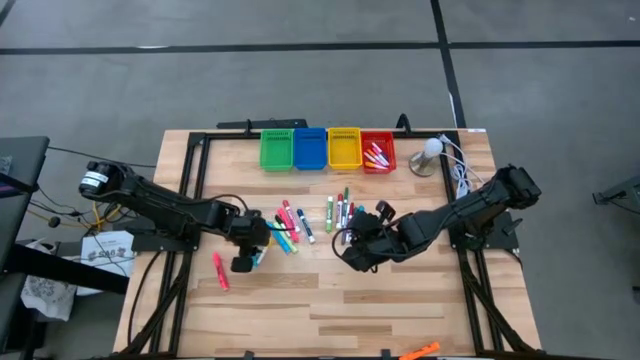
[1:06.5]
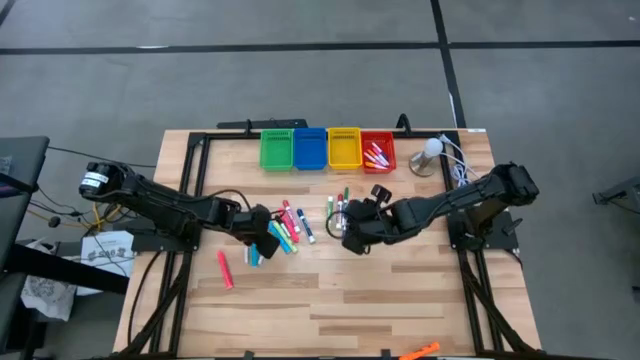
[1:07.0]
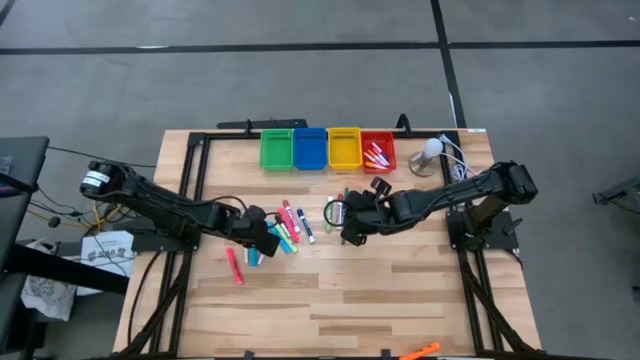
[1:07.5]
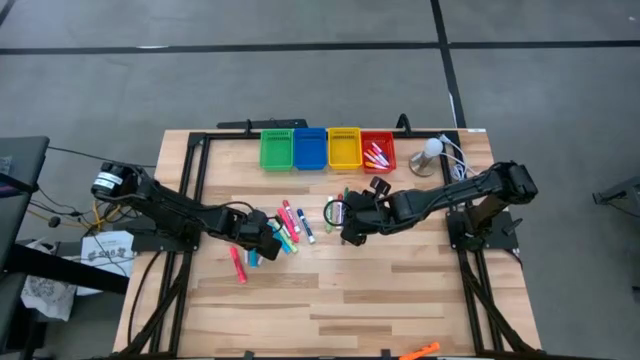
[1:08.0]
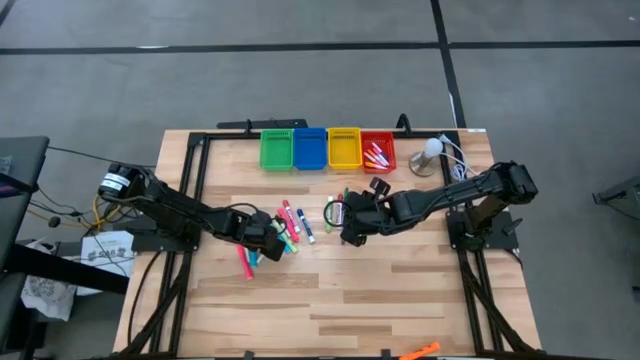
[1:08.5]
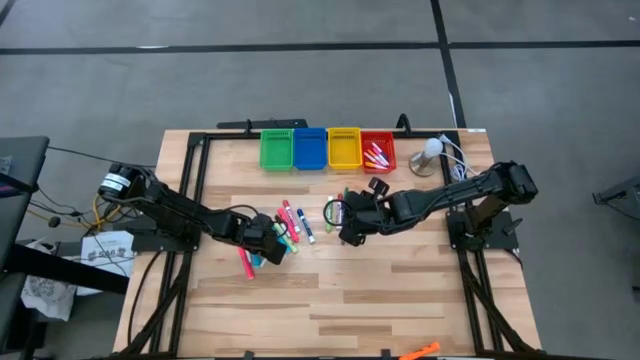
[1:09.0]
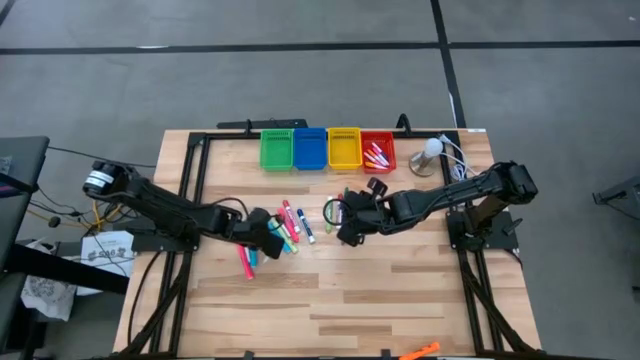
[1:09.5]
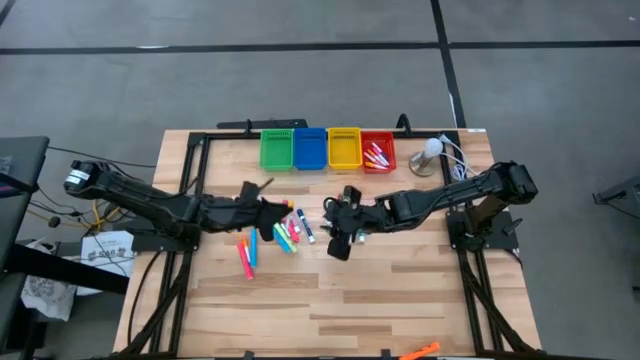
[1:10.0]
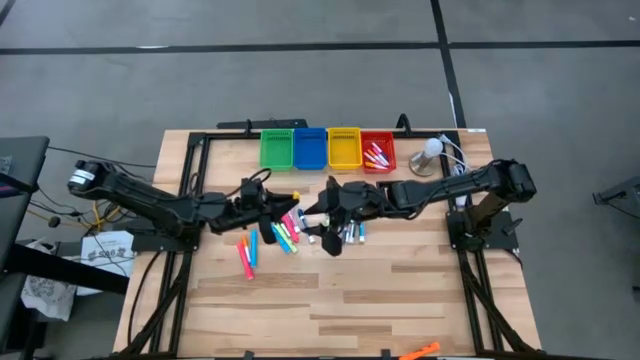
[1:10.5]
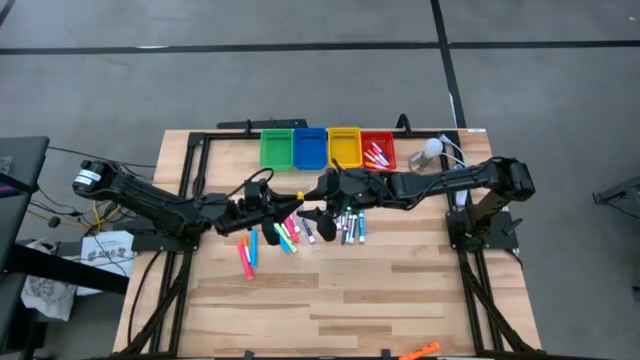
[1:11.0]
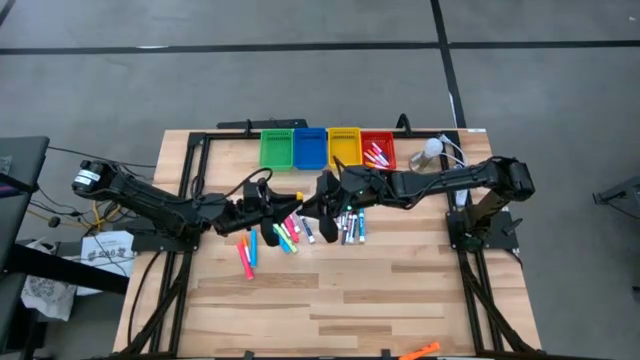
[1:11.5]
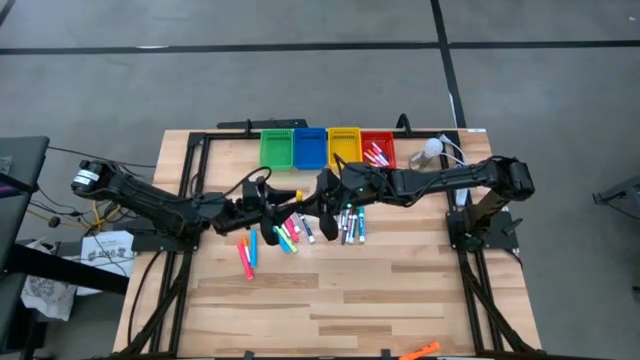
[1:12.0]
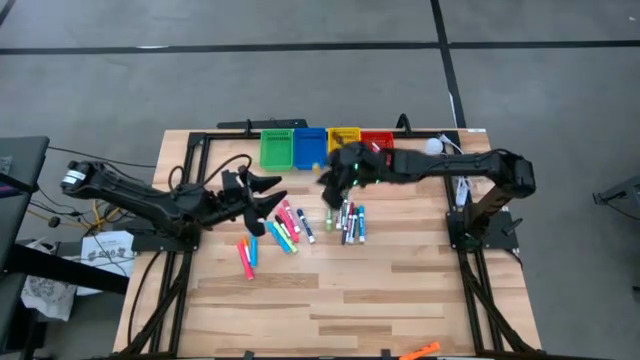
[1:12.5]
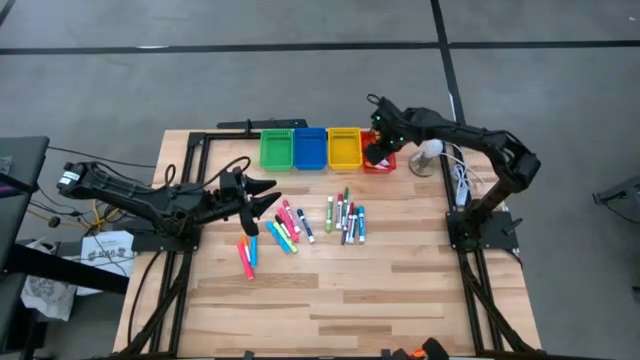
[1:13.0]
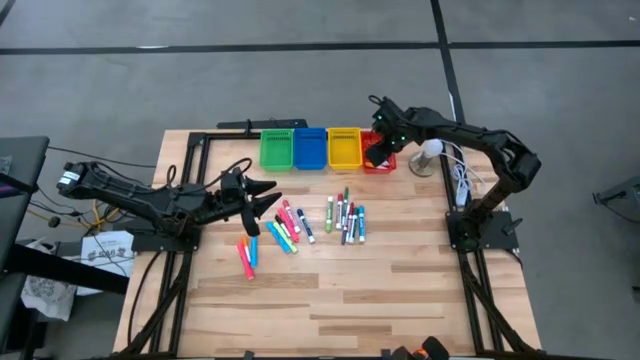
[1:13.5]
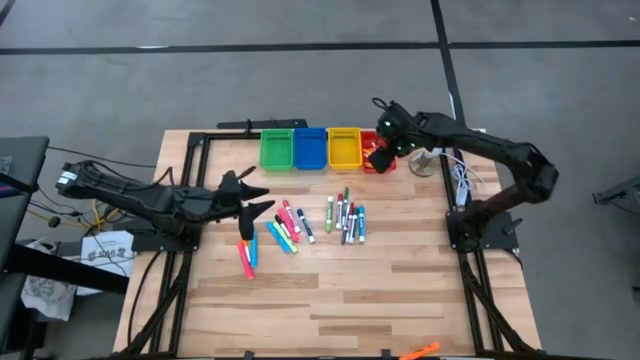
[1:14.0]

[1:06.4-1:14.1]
Task: Pick & Place Markers
Put the yellow mini marker into the red basket

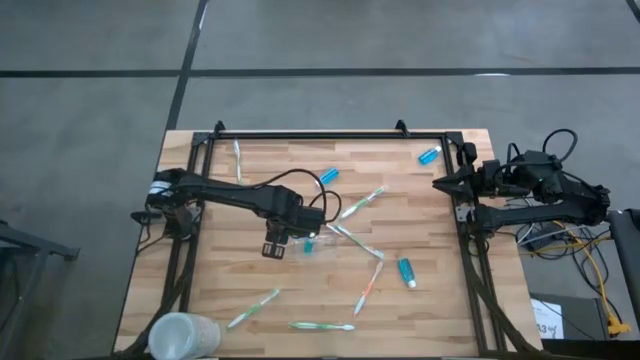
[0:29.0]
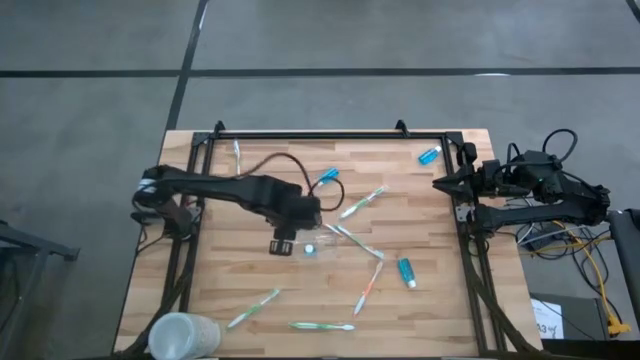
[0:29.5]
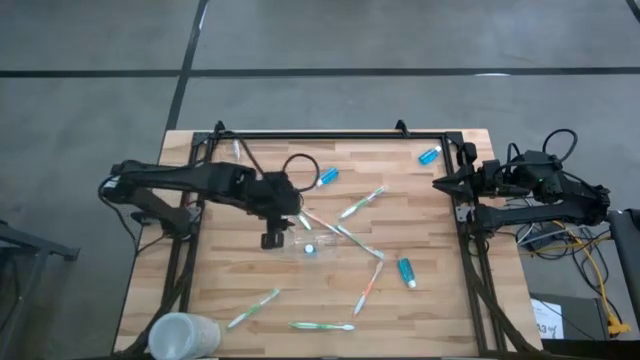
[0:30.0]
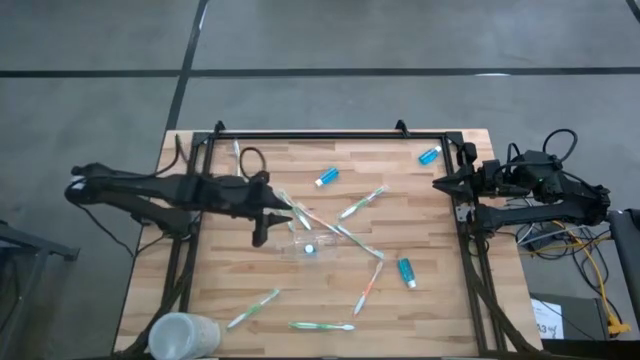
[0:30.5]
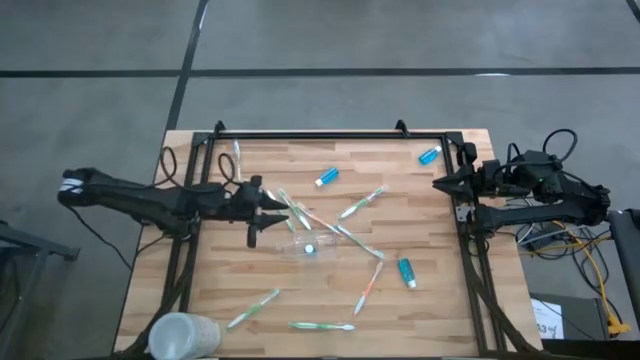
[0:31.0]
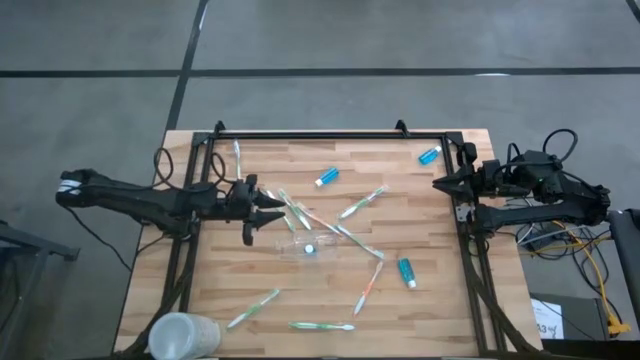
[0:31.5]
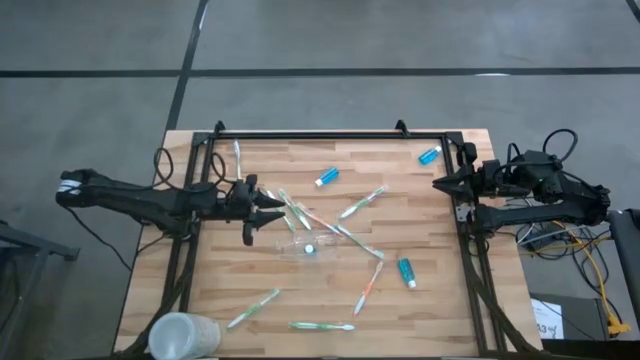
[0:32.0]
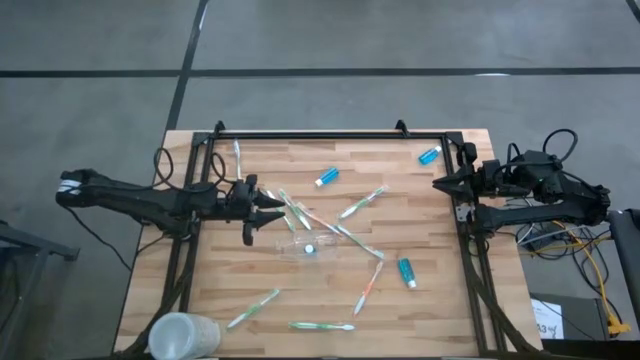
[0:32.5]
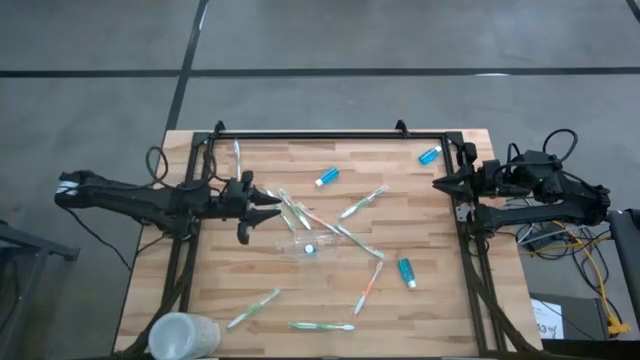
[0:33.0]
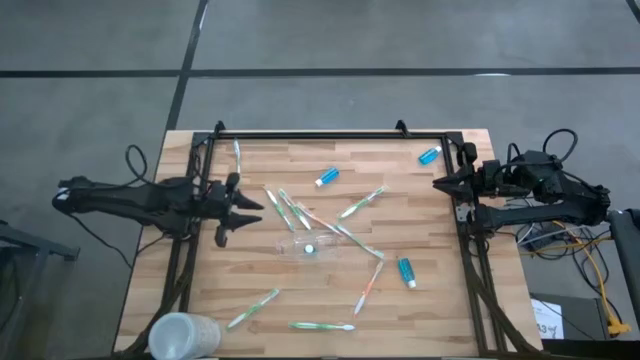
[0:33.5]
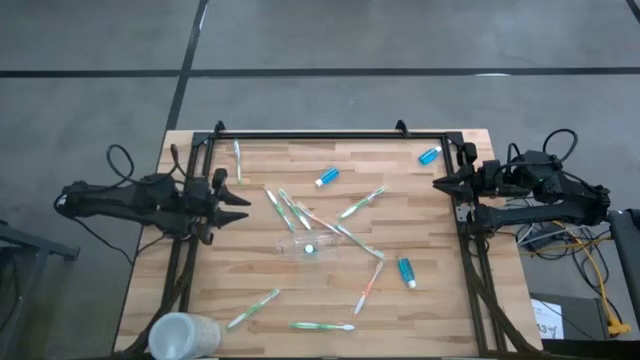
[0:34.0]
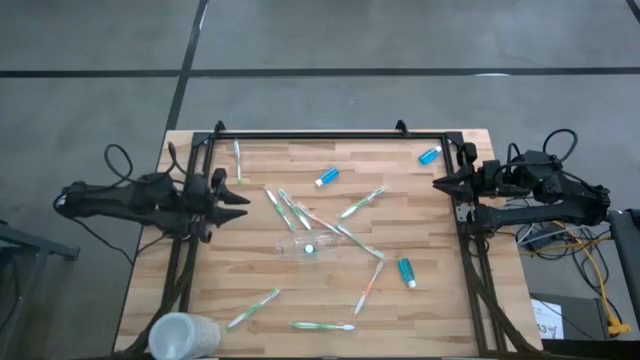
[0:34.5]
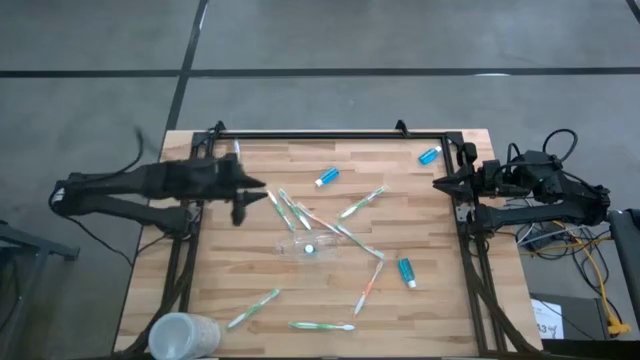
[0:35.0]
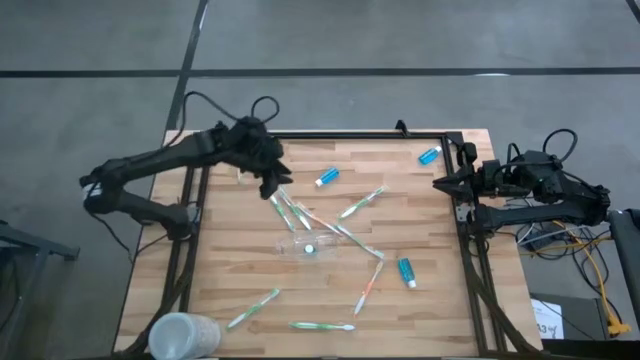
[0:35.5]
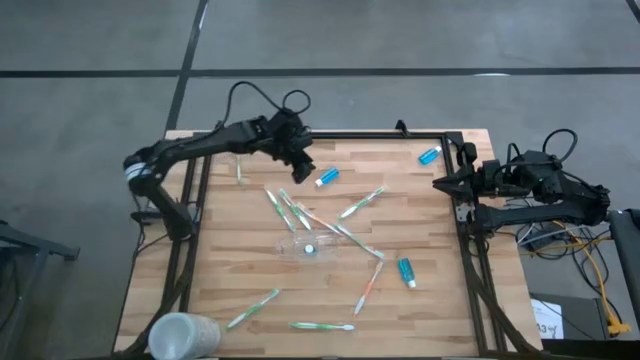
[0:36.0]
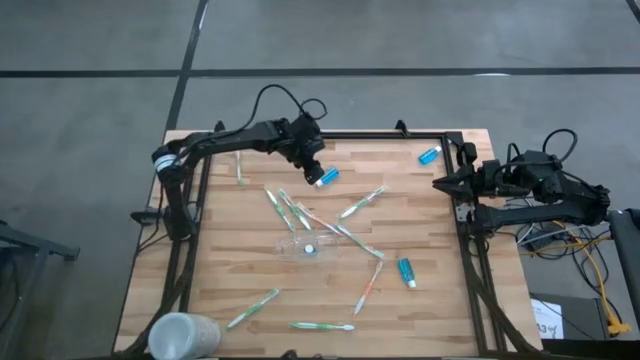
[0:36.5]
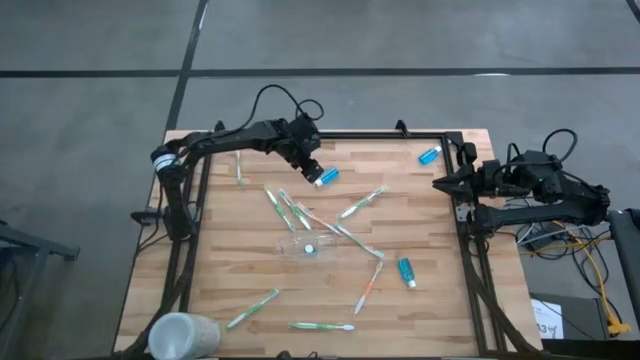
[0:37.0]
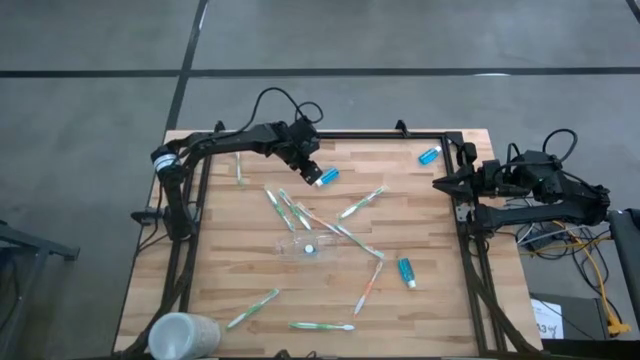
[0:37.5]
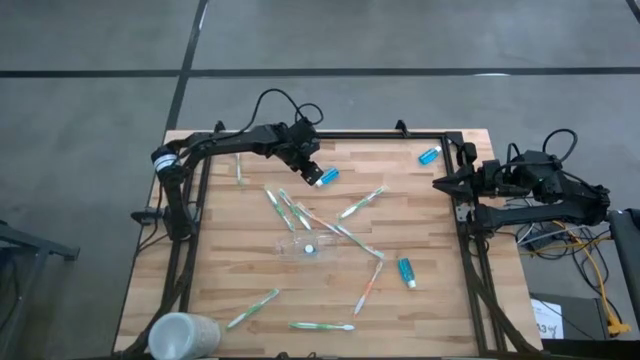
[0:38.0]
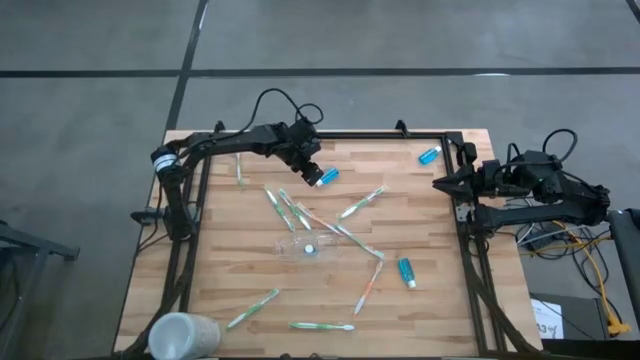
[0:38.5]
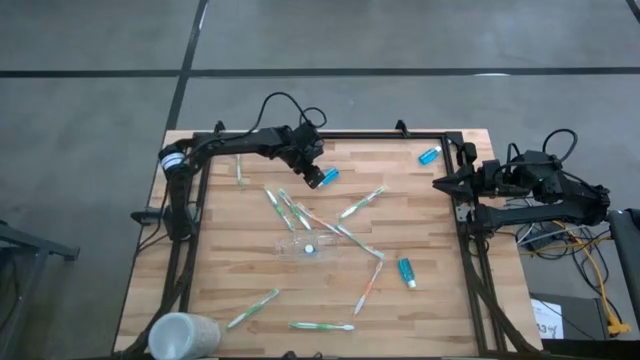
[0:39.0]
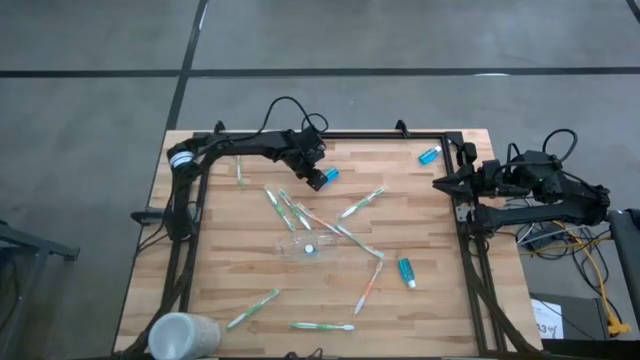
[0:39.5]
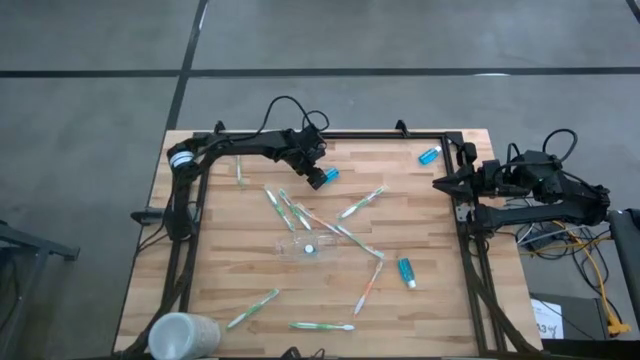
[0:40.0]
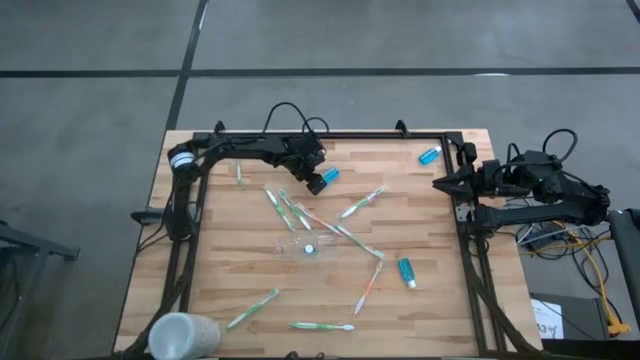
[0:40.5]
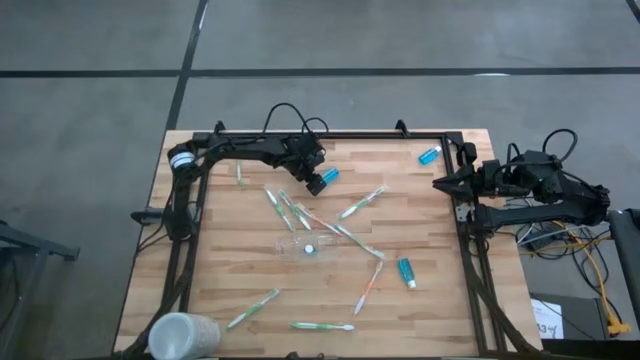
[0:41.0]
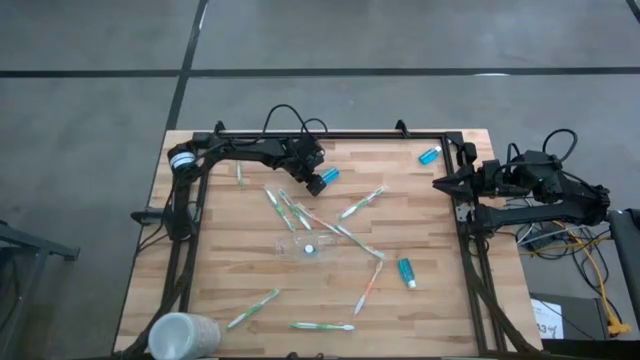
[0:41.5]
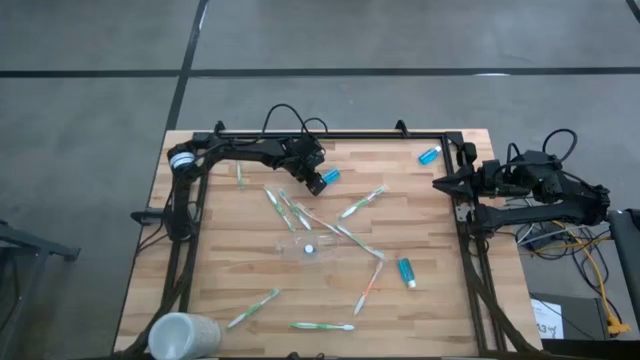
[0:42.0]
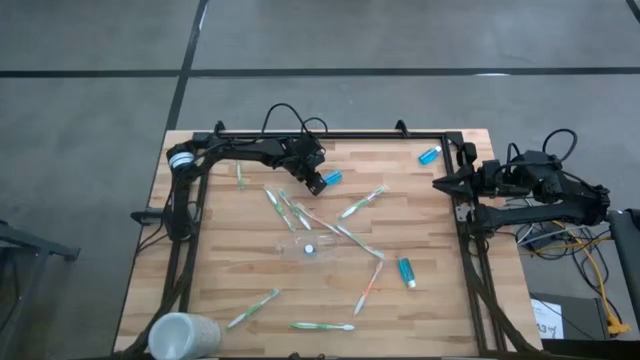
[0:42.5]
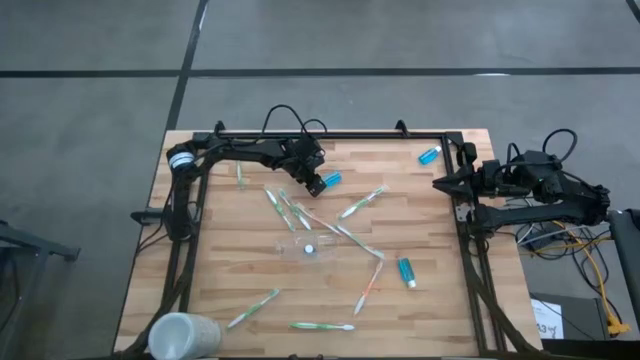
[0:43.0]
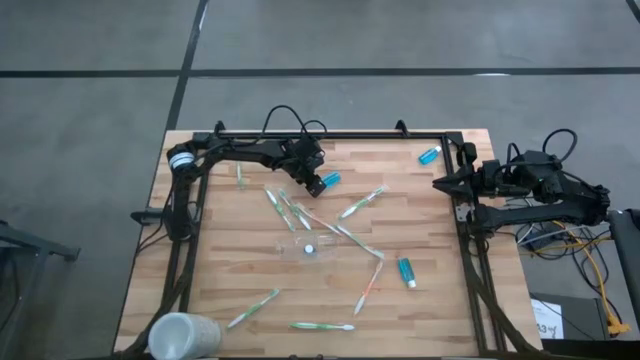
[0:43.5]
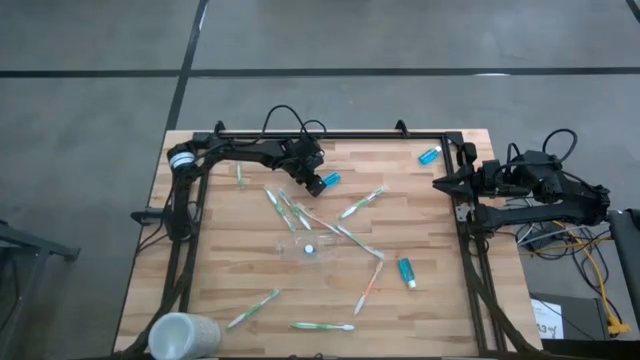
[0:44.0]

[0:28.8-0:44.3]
Task: Pick & Place toothbrushing station
Put the blue mouthwash bottle into the transparent organizer
